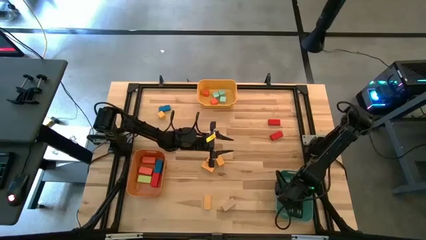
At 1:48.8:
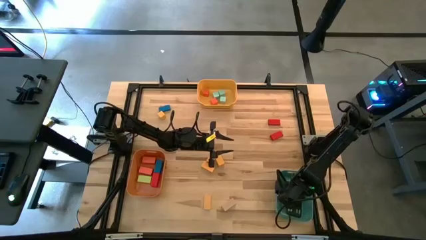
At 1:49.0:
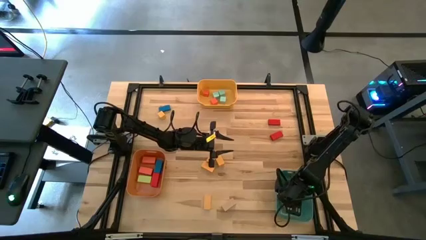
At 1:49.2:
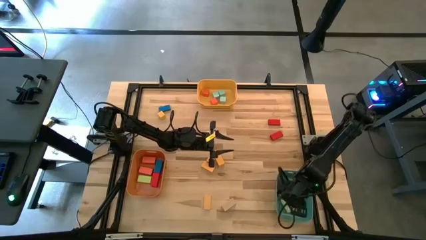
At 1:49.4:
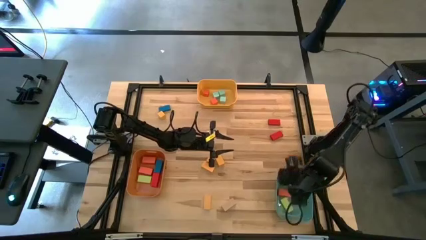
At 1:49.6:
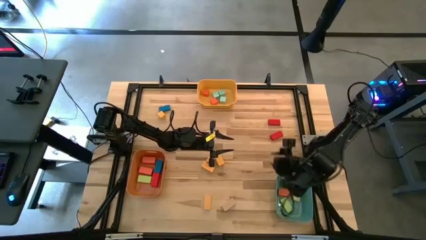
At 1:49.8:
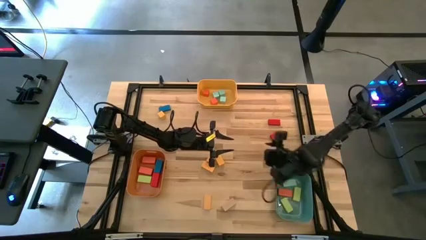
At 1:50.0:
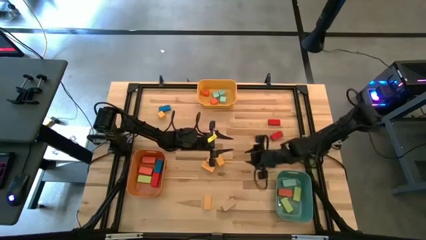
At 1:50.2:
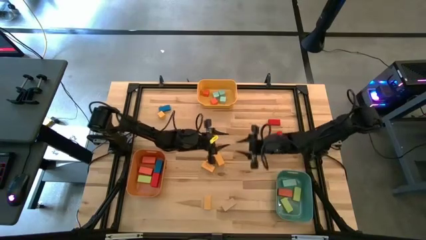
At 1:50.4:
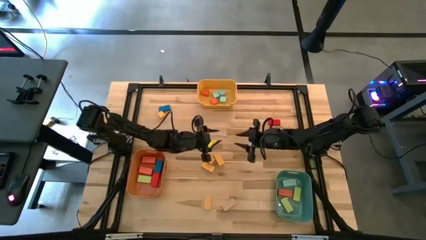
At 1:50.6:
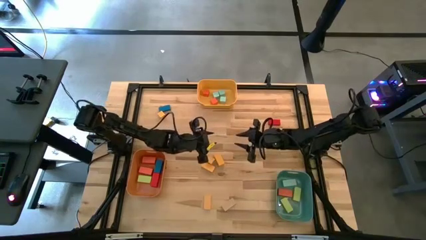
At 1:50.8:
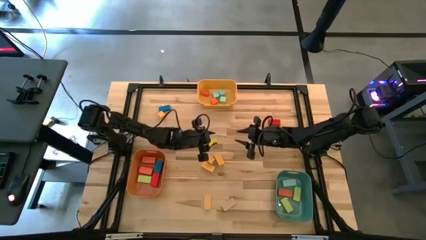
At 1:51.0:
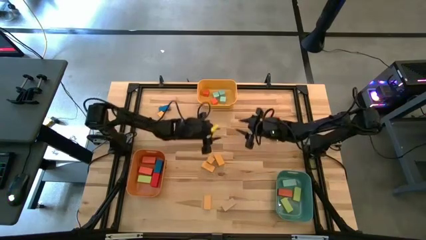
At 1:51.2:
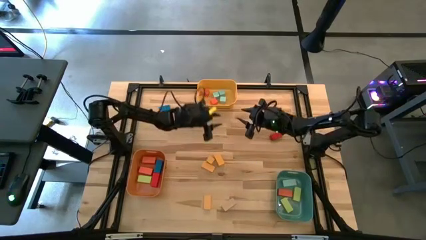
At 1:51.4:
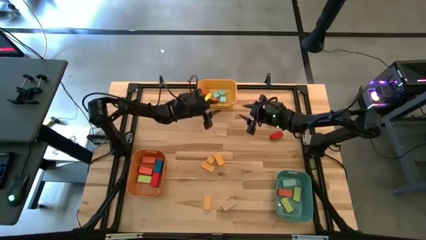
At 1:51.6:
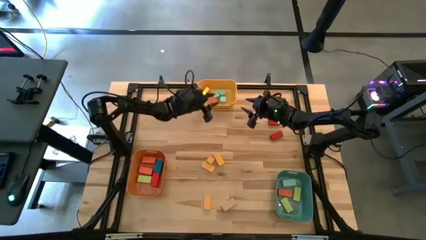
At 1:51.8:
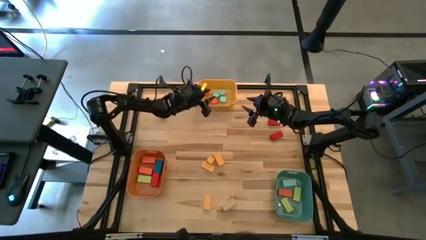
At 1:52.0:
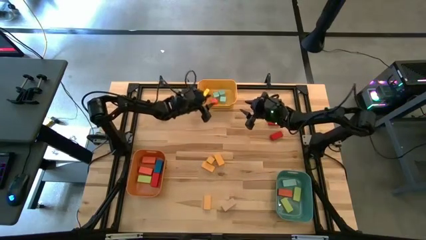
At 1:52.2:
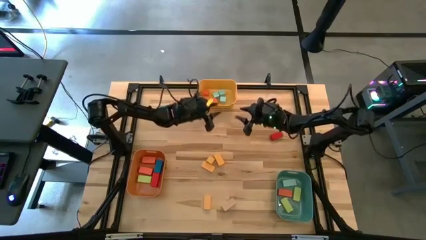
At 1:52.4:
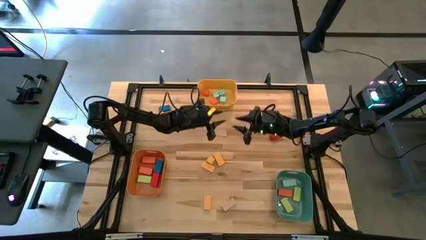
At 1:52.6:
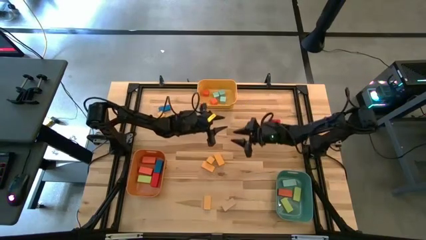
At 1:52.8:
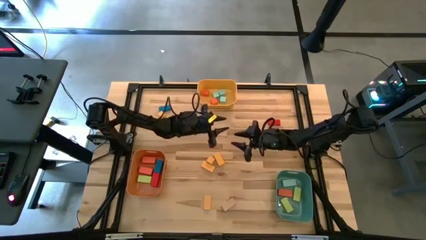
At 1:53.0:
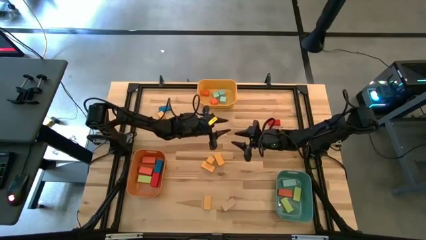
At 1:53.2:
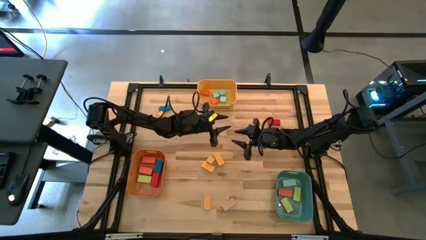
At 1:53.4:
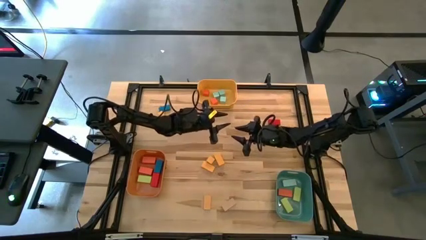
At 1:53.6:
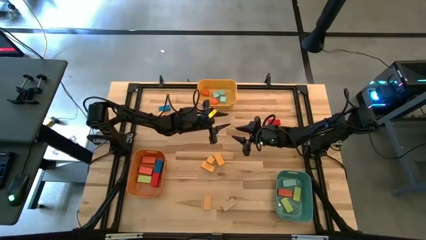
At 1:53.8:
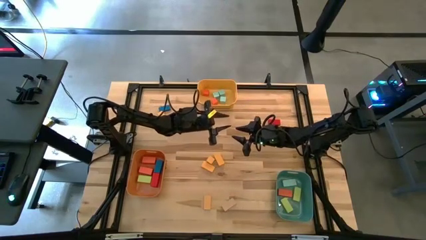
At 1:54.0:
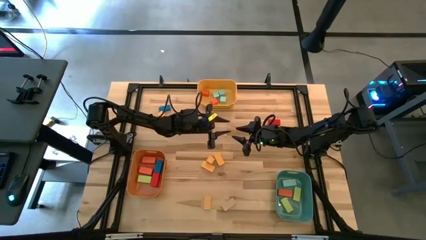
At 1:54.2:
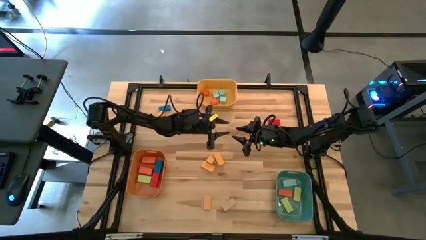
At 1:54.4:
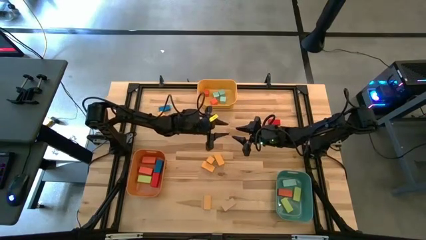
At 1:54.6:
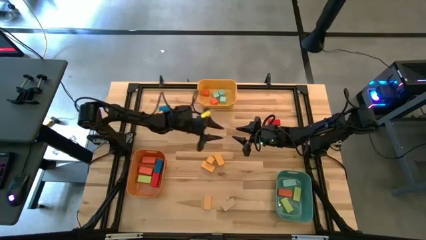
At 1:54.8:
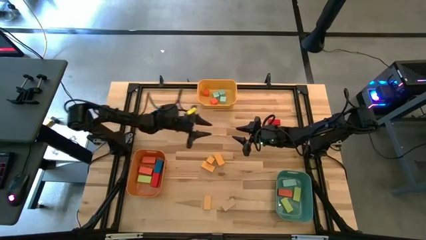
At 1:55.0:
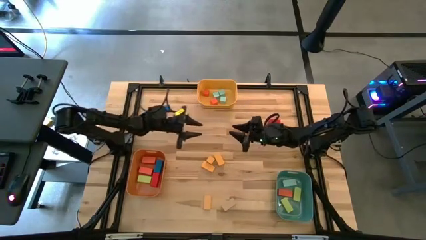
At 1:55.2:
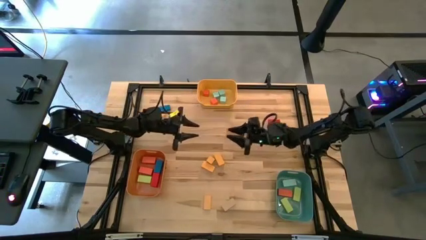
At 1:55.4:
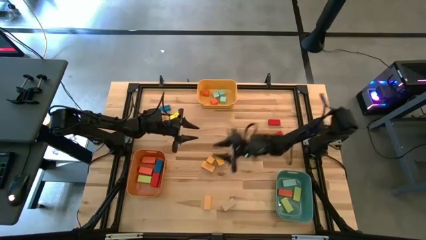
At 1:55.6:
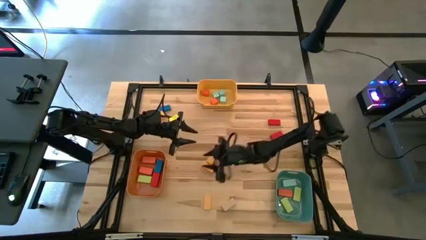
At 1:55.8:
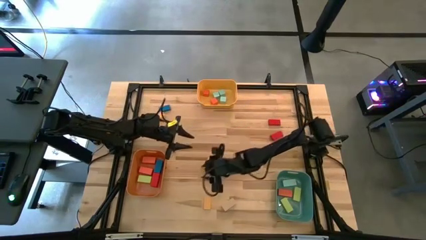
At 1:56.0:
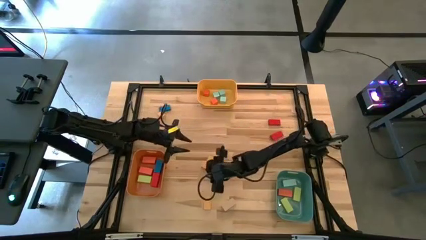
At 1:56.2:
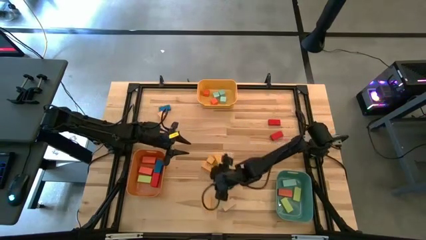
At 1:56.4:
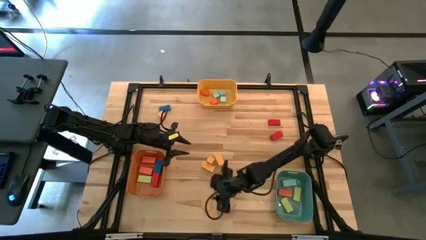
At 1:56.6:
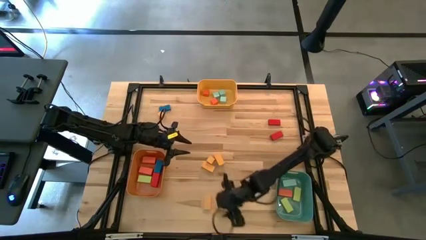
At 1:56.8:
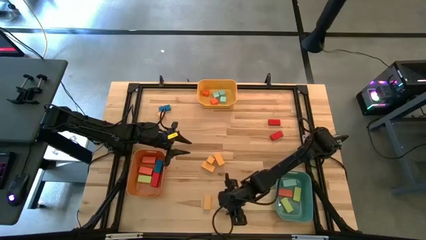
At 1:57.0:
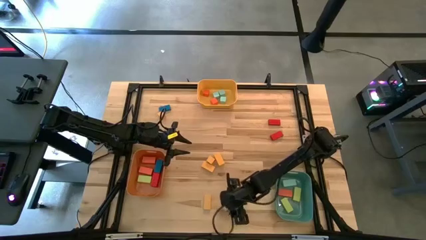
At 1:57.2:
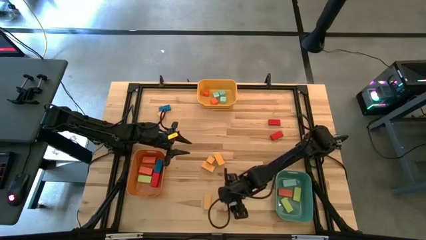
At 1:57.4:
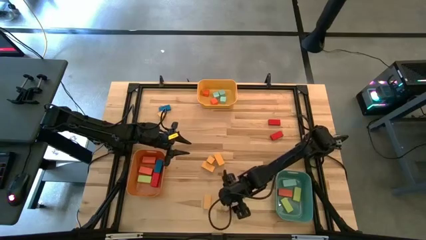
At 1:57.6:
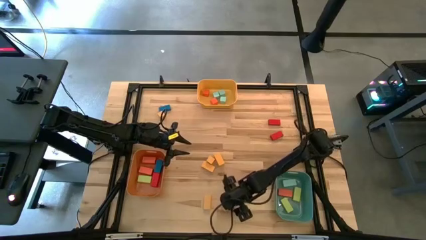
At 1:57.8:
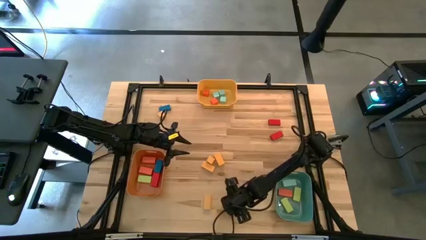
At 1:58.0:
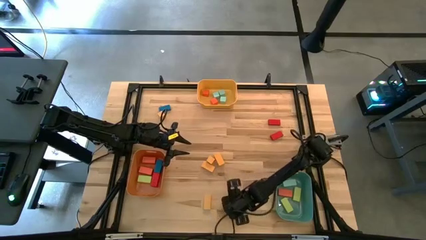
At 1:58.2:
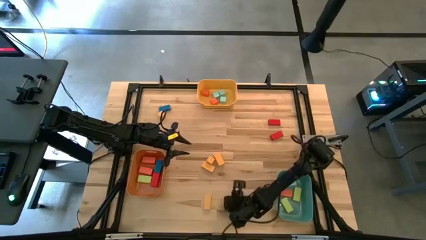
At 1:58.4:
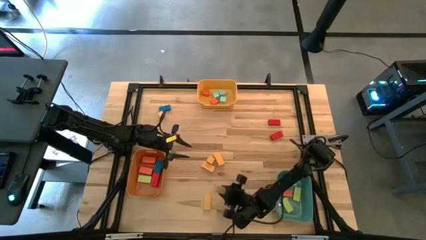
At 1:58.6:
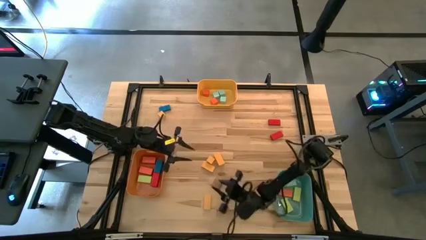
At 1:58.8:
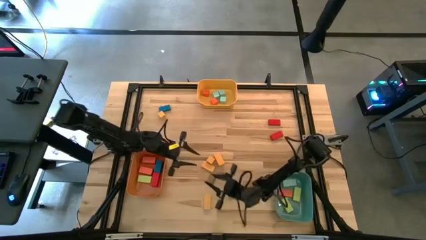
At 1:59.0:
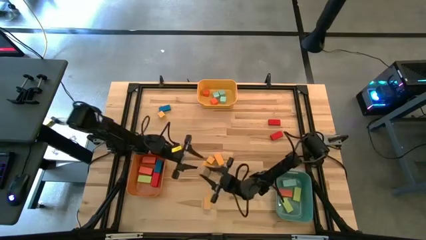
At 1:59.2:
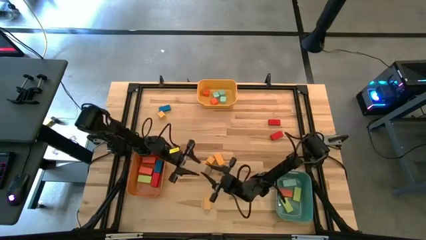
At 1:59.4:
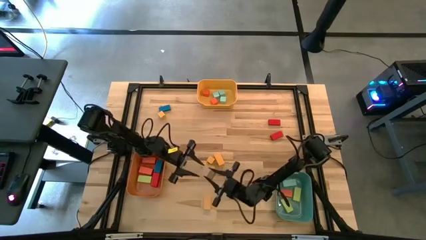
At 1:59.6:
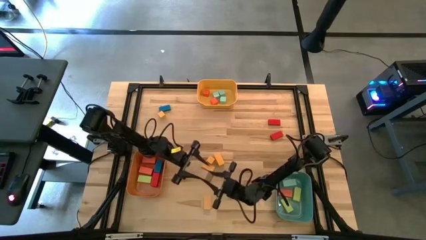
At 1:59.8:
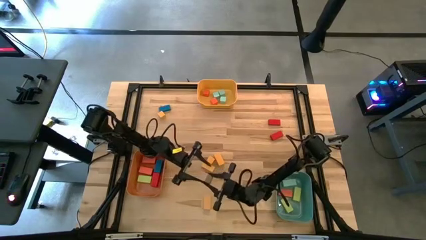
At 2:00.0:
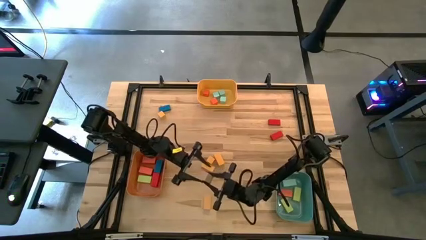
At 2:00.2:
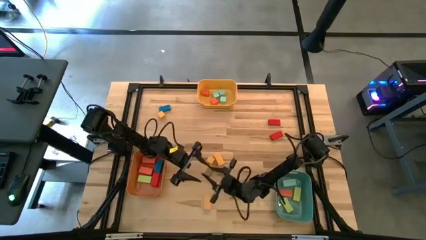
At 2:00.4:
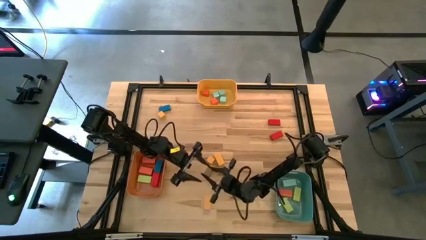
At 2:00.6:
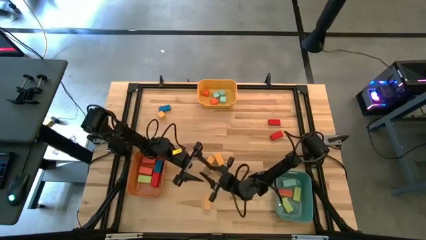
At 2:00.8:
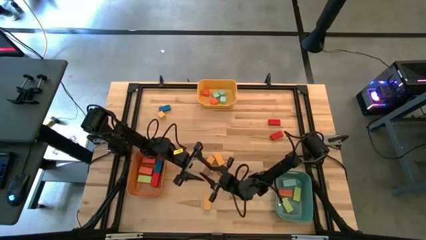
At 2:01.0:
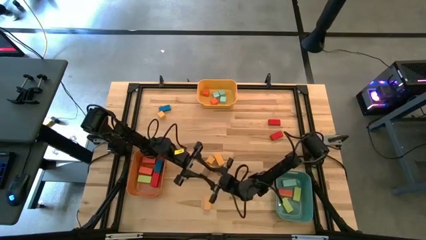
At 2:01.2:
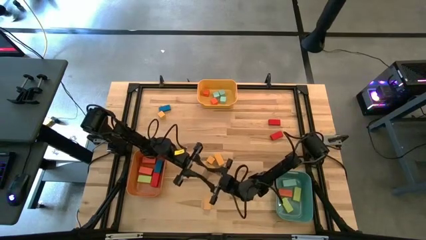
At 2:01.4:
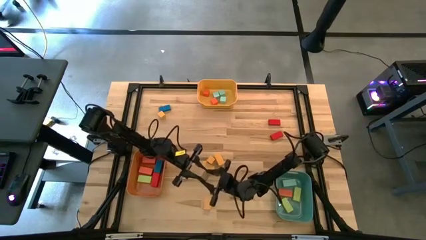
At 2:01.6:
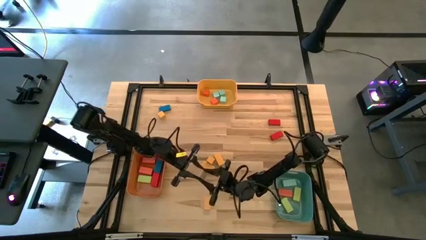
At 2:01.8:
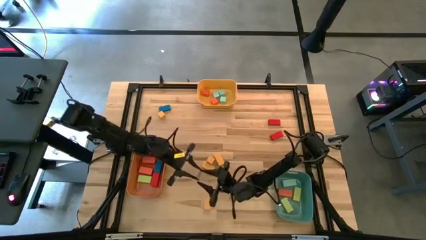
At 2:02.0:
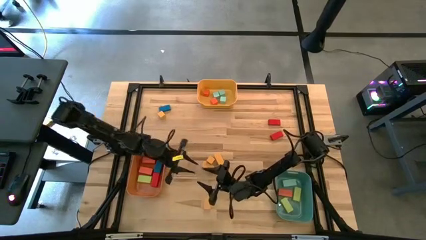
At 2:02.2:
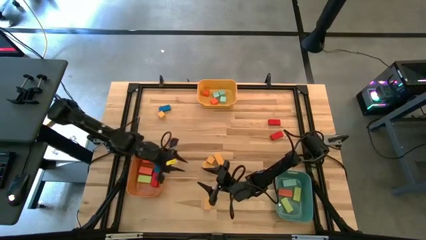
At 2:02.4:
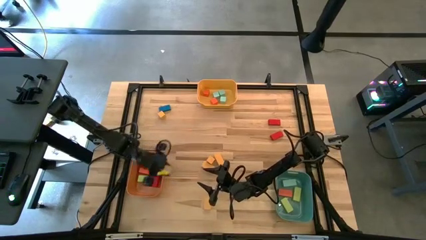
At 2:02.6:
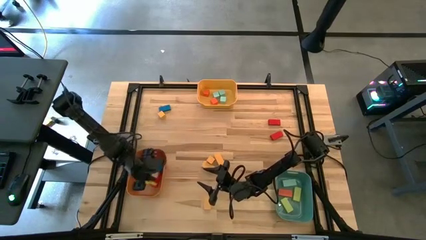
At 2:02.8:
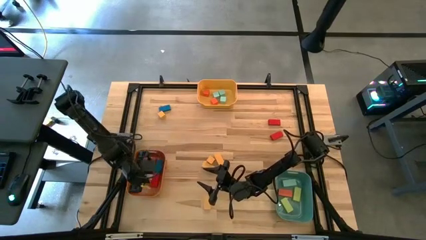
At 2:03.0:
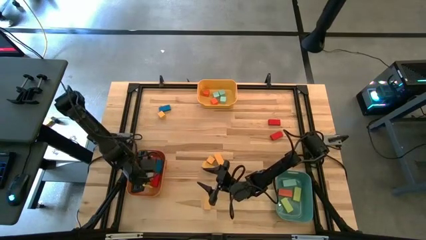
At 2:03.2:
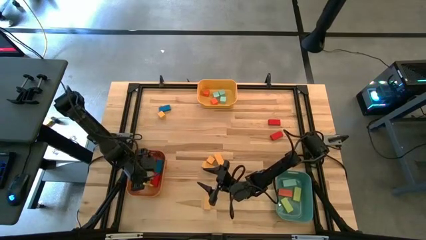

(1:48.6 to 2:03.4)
Task: Sort blocks by size
Put the thick brown block into the orange bin

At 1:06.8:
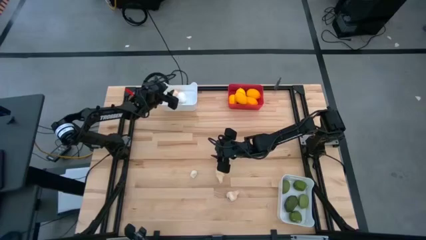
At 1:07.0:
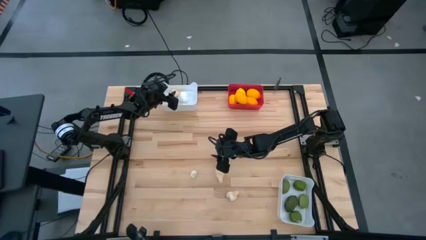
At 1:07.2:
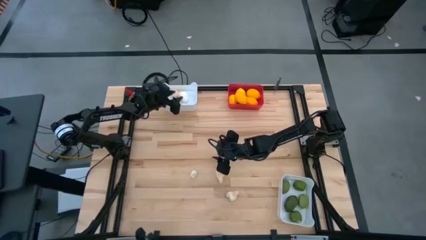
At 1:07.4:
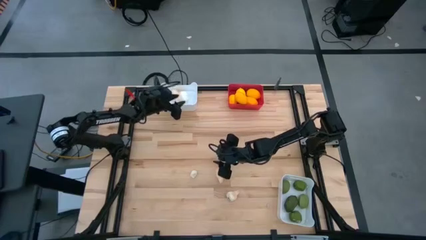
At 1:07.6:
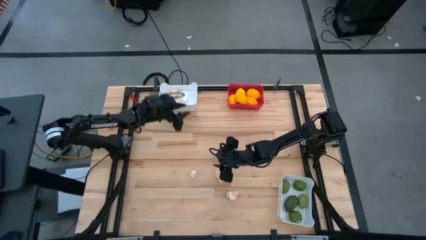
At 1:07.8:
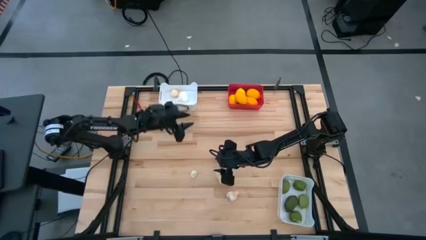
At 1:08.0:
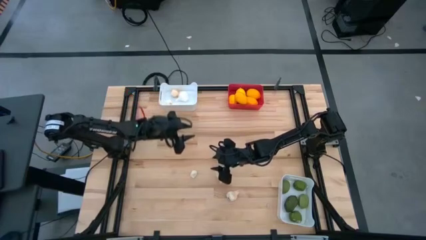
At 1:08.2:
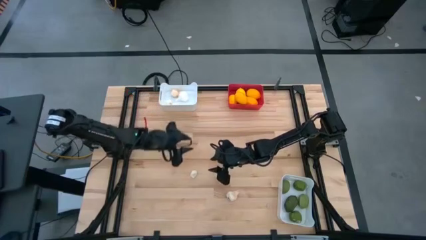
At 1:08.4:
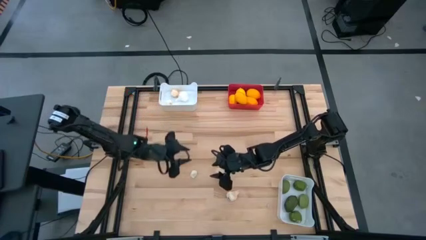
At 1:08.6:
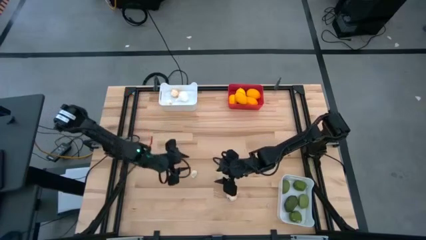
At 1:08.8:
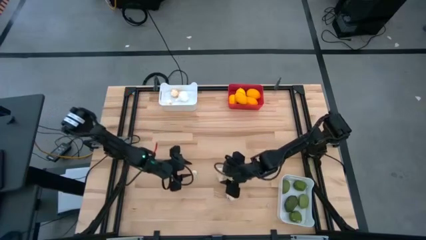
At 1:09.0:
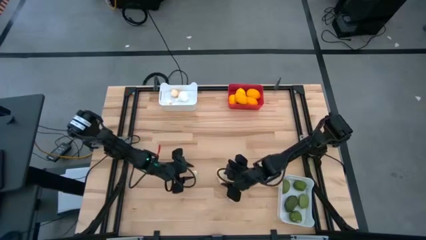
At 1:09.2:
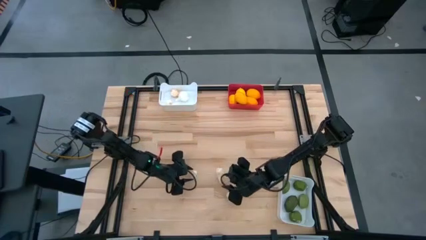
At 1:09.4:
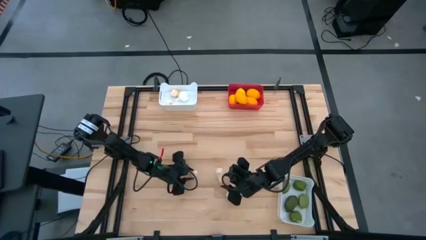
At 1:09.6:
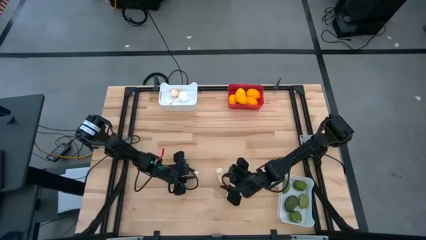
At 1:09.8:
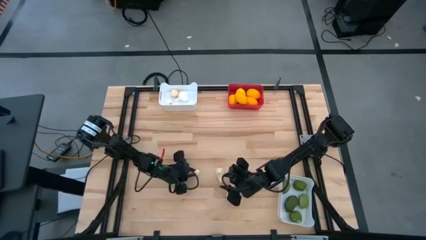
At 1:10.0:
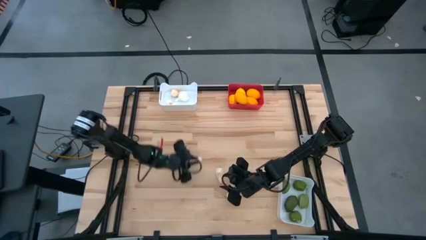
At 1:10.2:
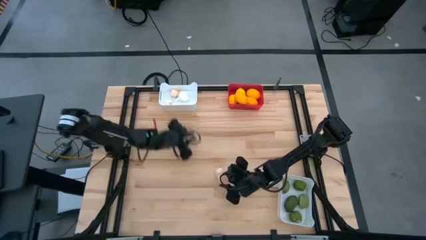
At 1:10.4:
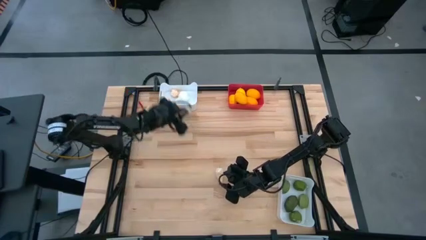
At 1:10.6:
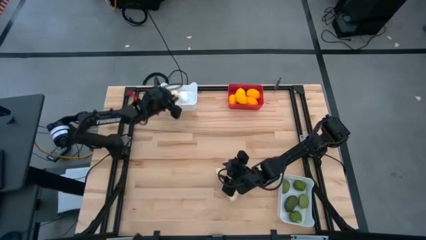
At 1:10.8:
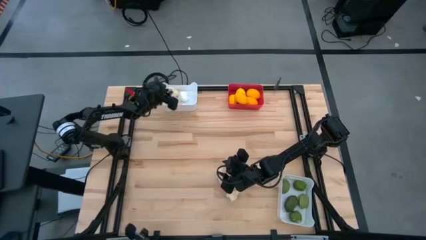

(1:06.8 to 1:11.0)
Task: Sort produce into baskets
Put the white garlic into the top white bin
